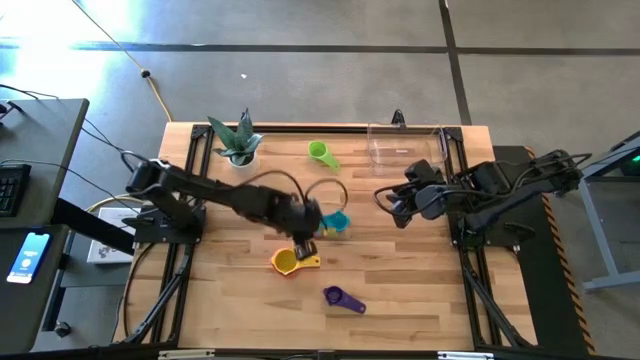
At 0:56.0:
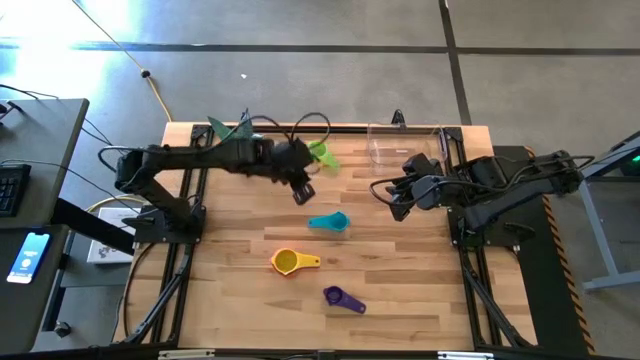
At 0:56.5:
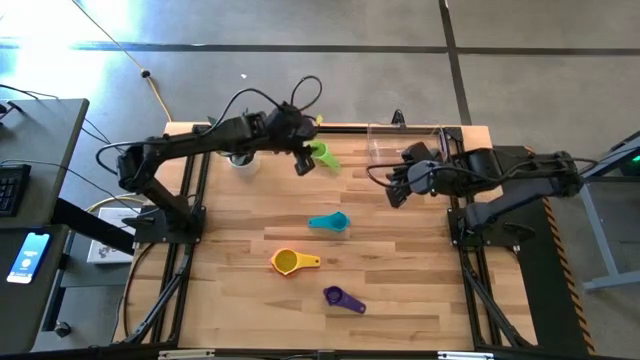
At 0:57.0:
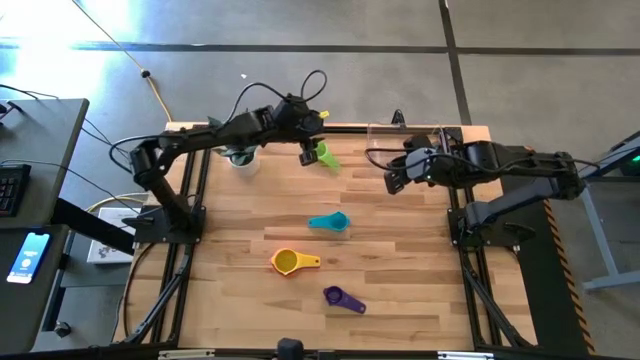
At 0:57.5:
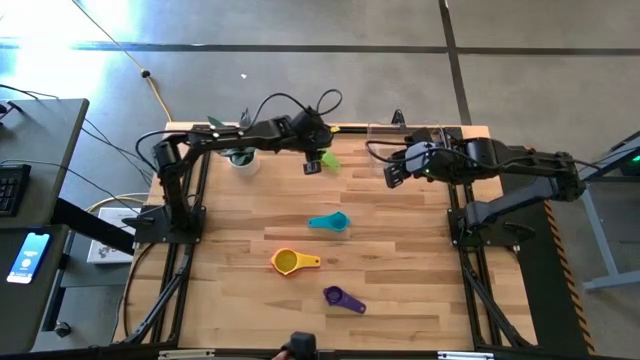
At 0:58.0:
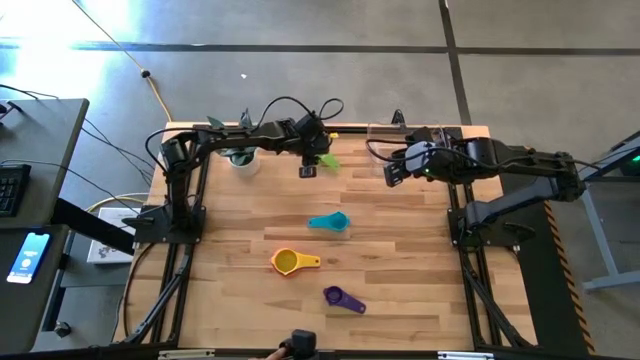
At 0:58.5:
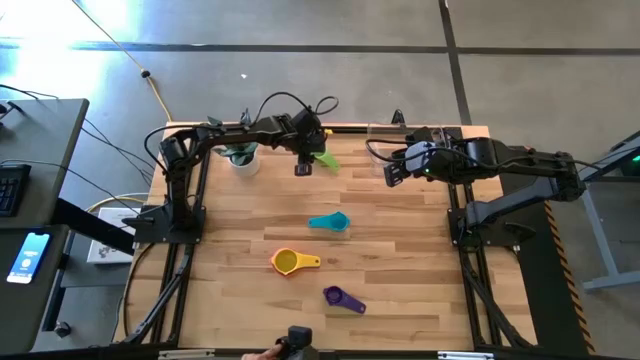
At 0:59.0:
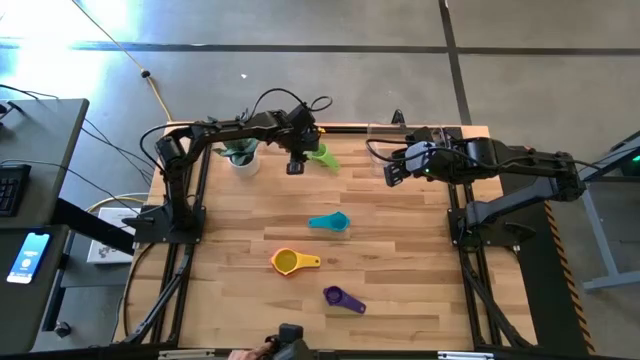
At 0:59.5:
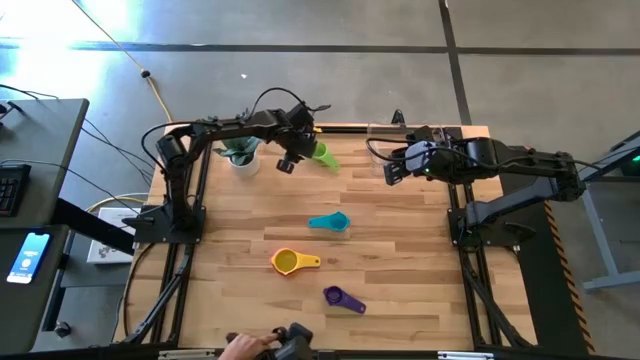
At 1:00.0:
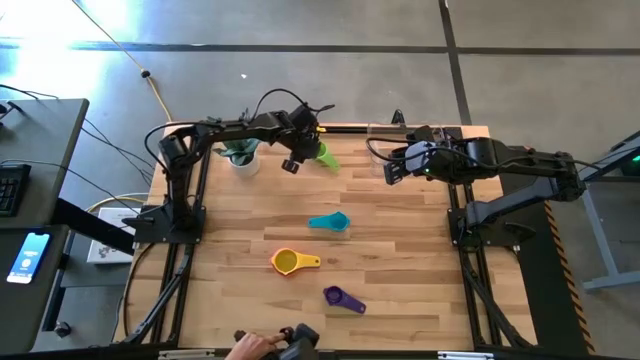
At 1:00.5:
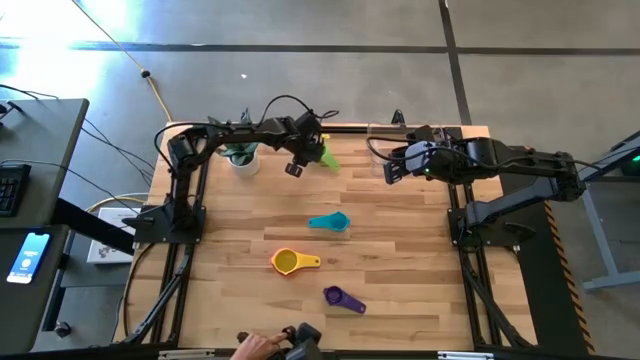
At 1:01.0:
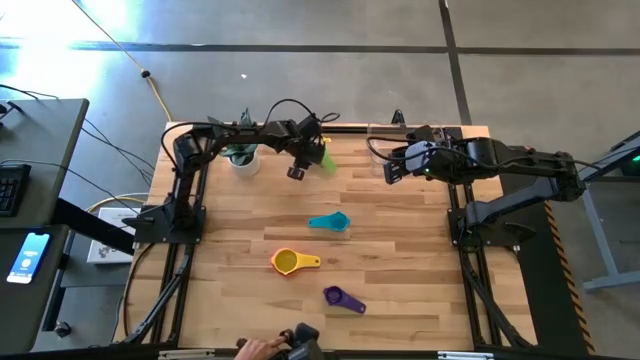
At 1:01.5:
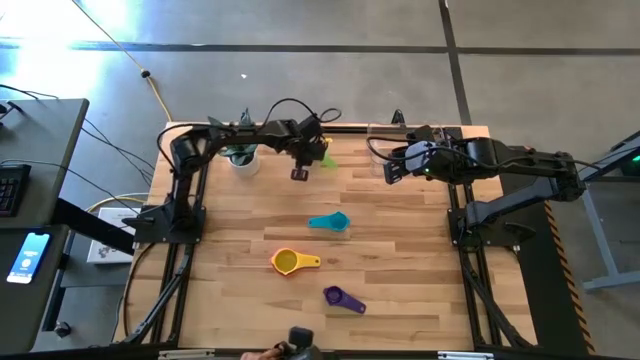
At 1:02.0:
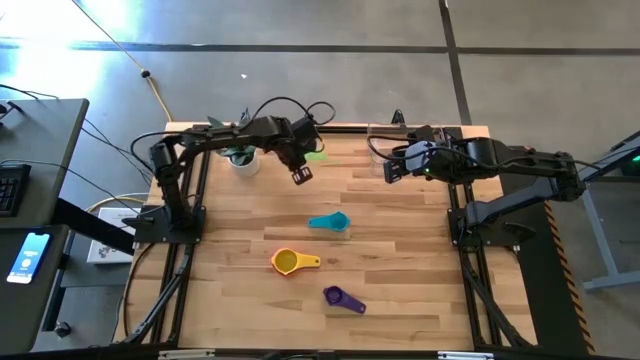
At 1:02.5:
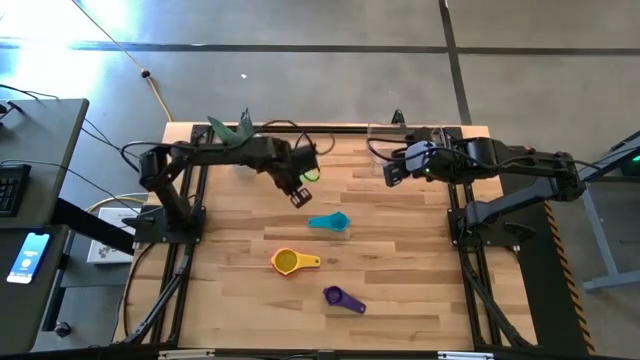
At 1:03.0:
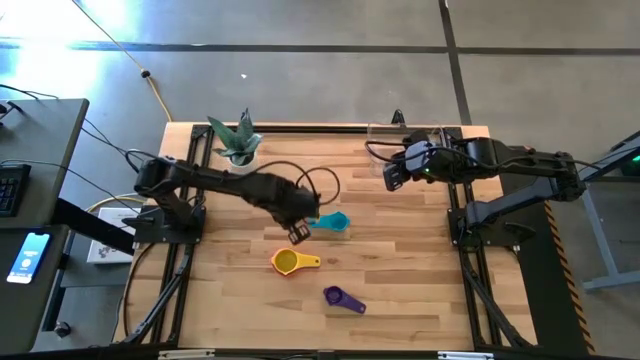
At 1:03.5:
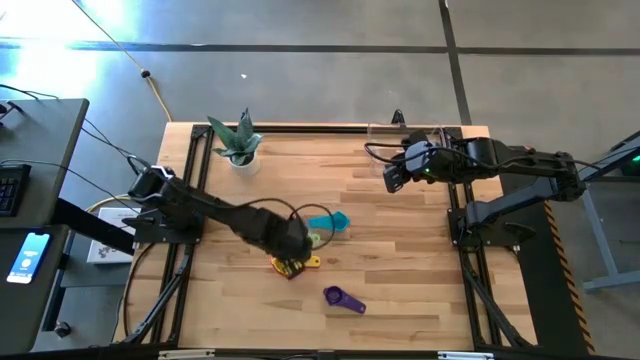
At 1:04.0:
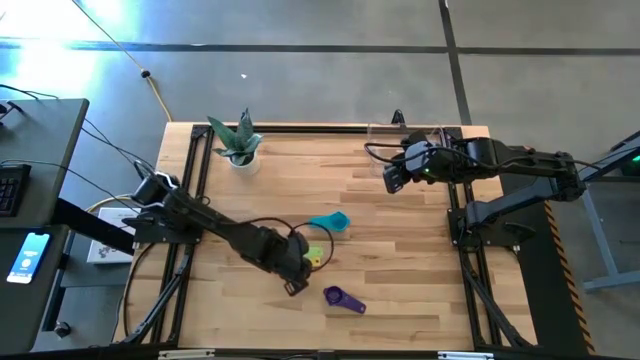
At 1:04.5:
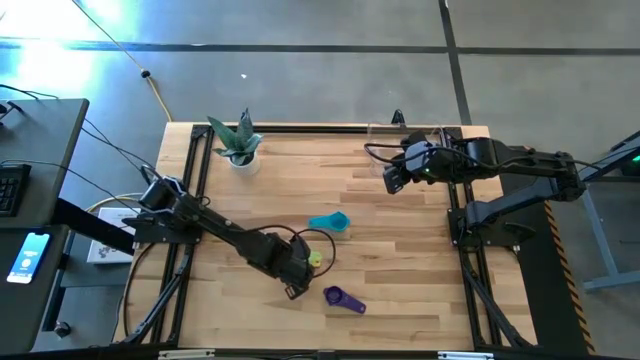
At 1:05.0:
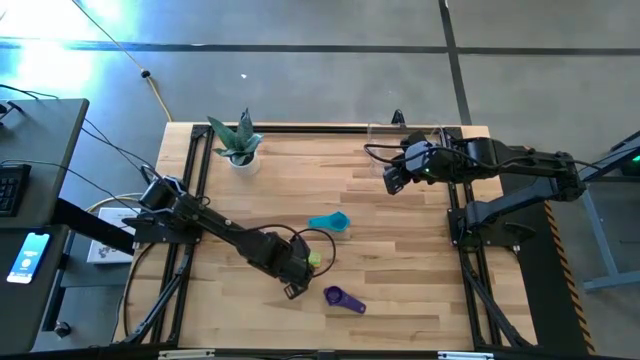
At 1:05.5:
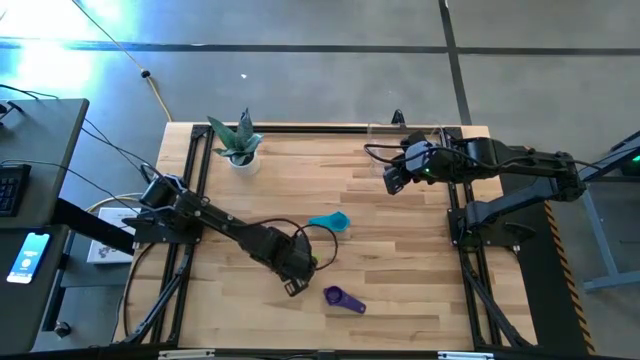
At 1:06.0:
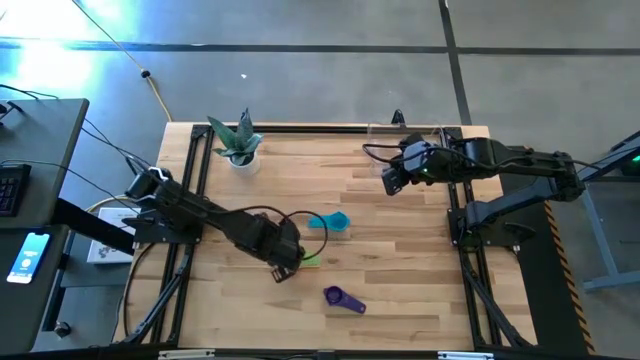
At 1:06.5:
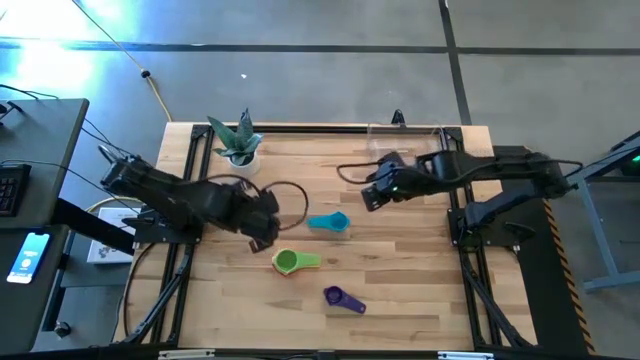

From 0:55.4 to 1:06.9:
Task: Nest measuring cups in basket
Stack the green measuring cup into the yellow measuring cup
